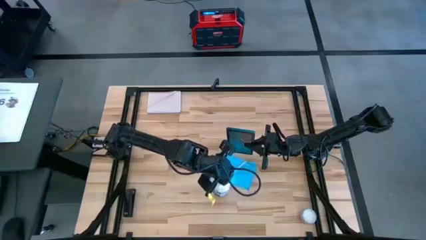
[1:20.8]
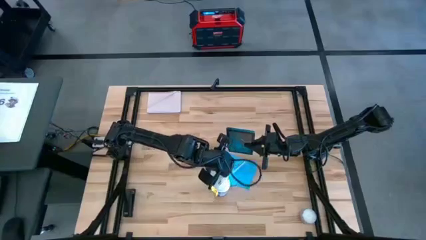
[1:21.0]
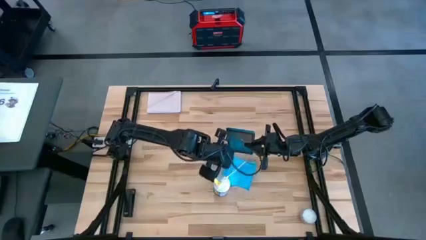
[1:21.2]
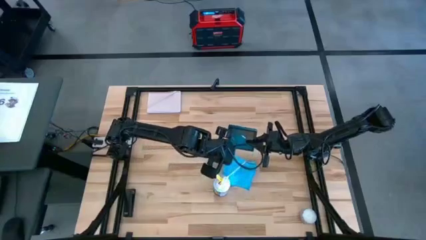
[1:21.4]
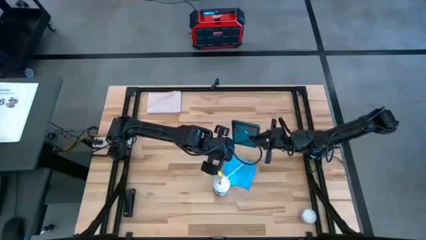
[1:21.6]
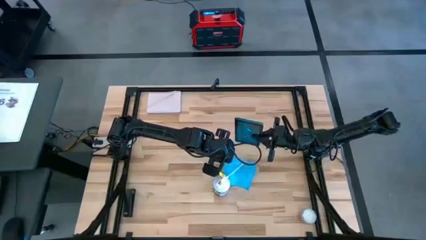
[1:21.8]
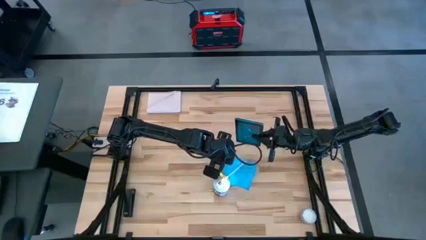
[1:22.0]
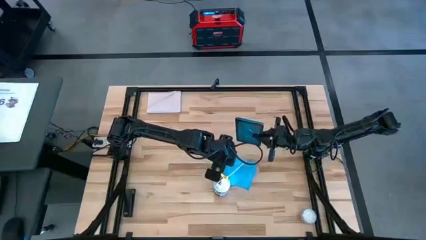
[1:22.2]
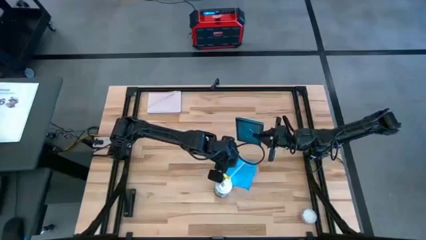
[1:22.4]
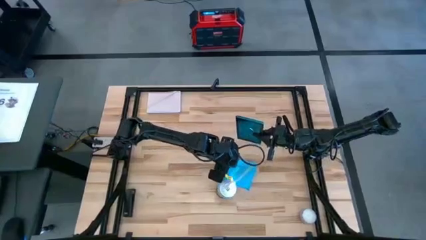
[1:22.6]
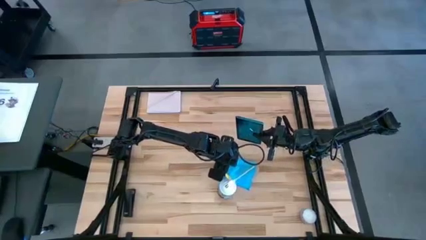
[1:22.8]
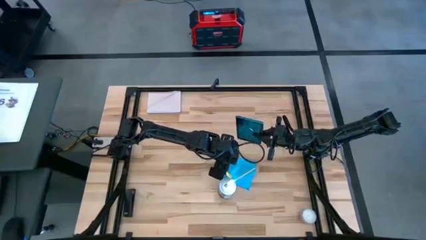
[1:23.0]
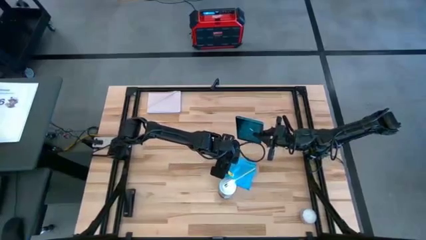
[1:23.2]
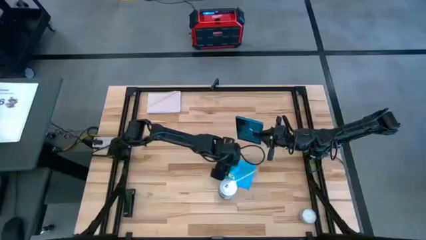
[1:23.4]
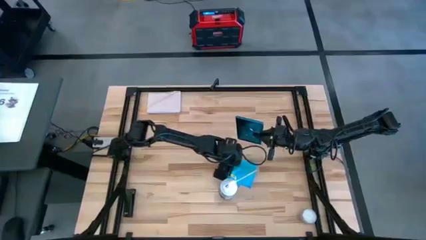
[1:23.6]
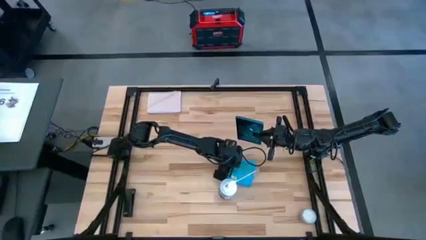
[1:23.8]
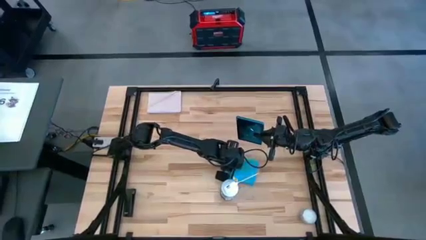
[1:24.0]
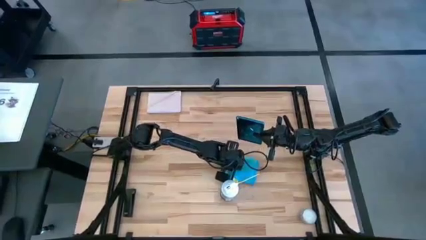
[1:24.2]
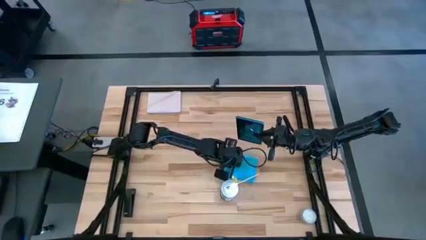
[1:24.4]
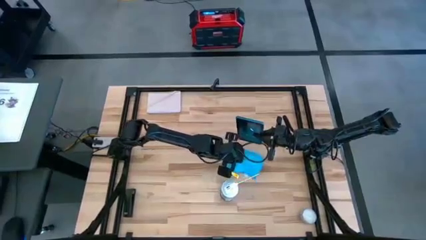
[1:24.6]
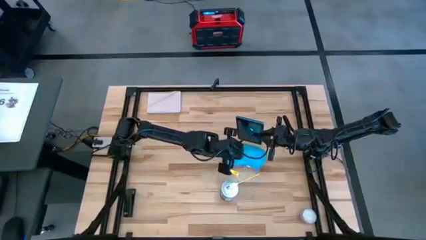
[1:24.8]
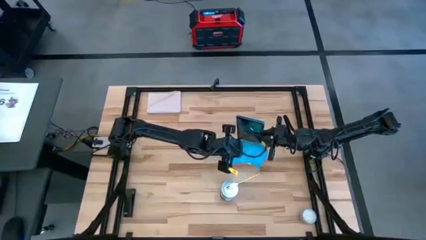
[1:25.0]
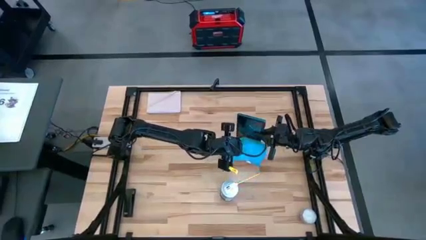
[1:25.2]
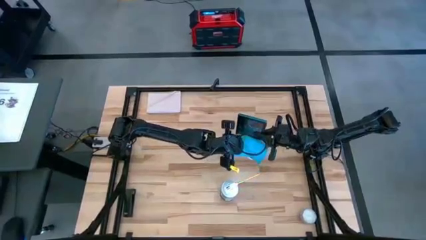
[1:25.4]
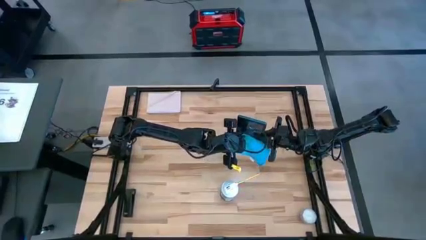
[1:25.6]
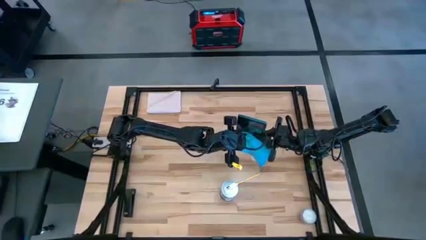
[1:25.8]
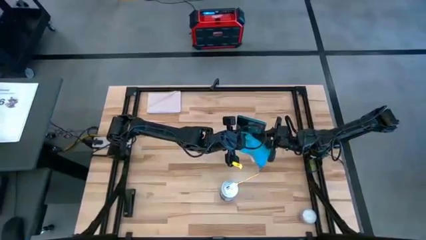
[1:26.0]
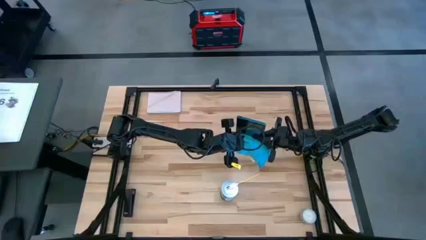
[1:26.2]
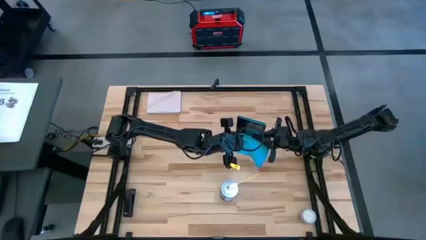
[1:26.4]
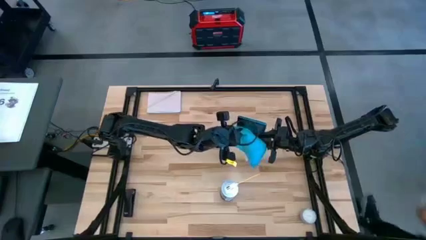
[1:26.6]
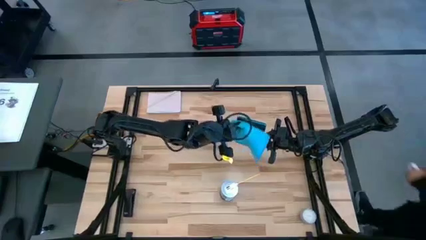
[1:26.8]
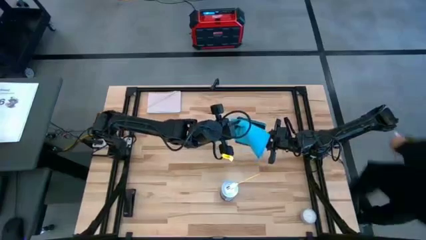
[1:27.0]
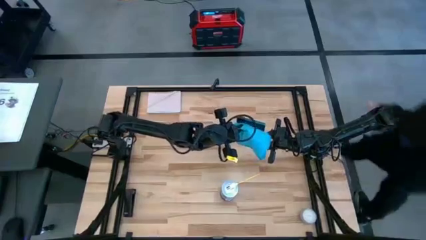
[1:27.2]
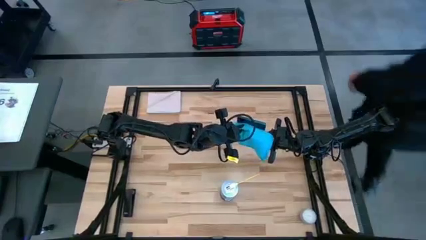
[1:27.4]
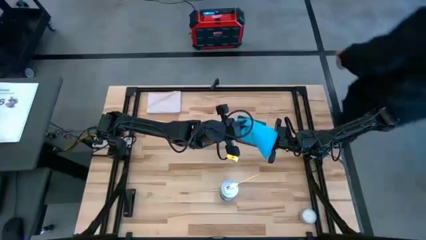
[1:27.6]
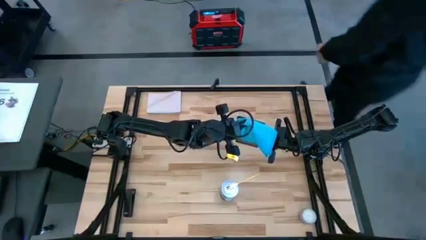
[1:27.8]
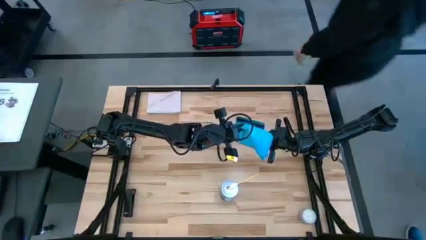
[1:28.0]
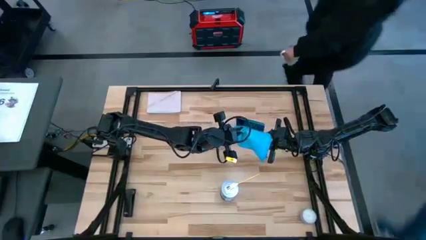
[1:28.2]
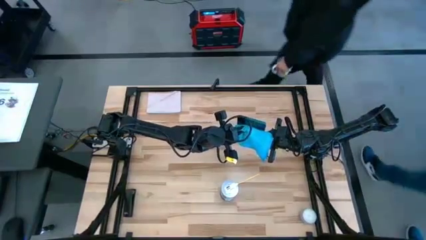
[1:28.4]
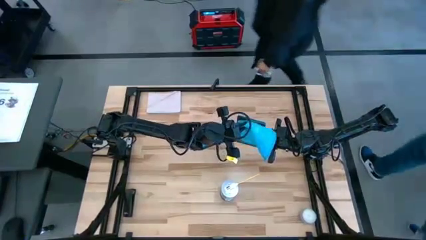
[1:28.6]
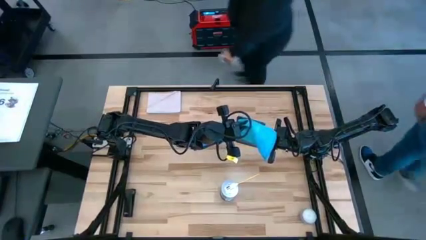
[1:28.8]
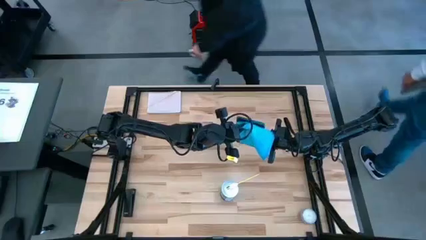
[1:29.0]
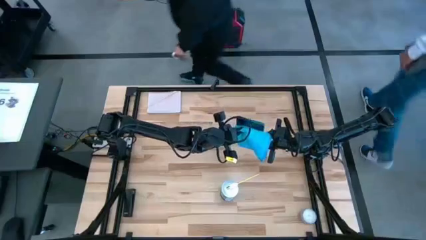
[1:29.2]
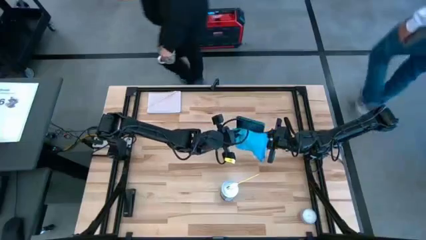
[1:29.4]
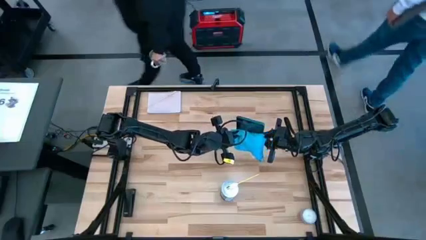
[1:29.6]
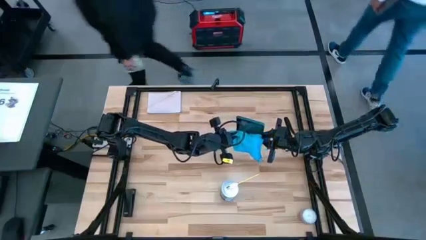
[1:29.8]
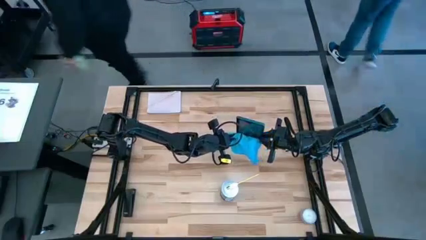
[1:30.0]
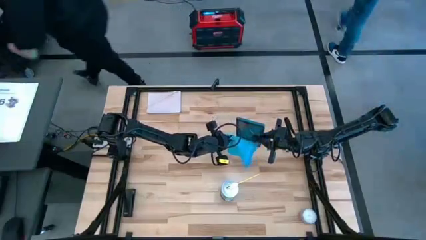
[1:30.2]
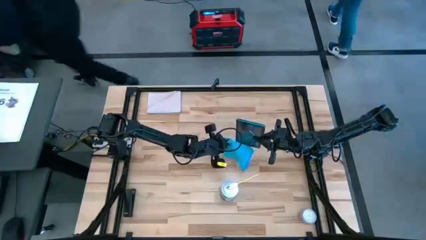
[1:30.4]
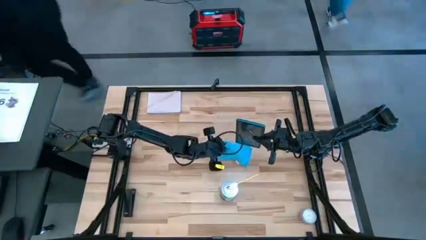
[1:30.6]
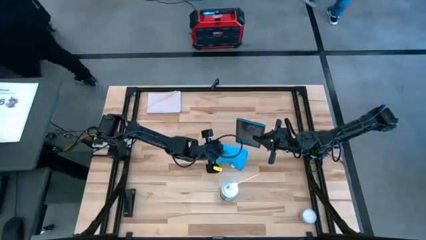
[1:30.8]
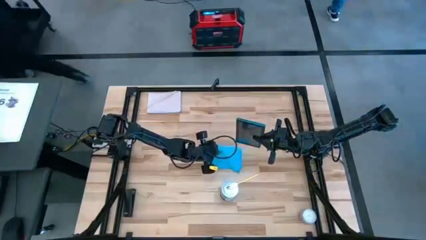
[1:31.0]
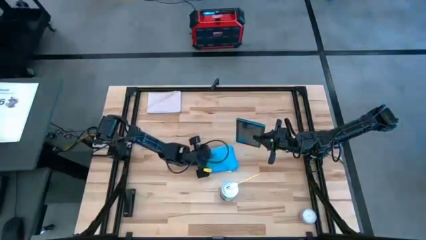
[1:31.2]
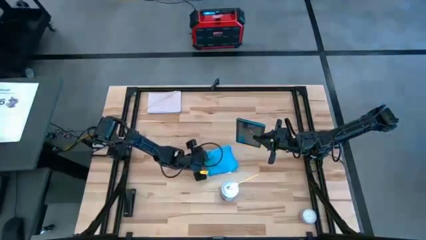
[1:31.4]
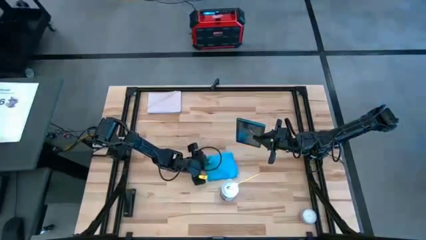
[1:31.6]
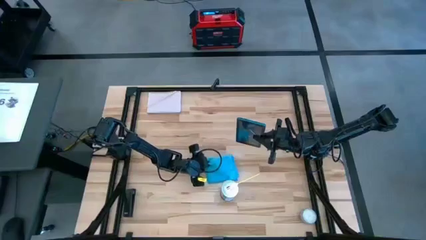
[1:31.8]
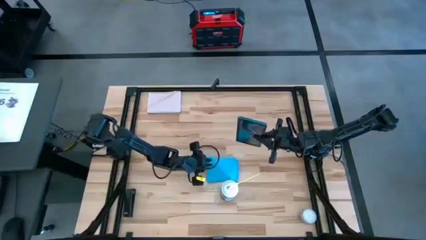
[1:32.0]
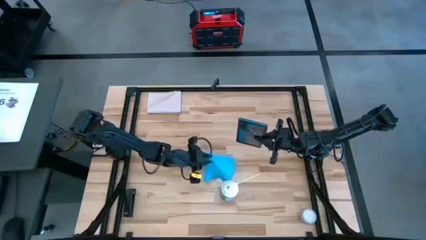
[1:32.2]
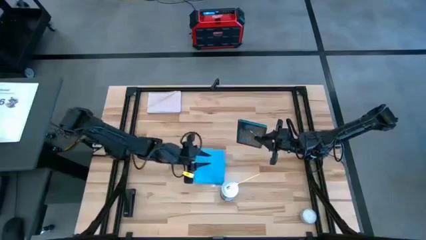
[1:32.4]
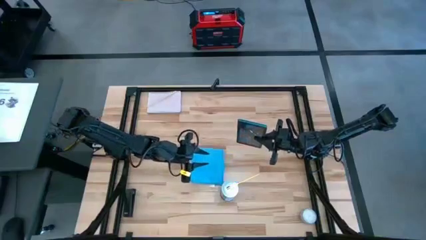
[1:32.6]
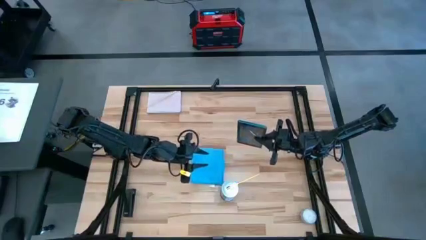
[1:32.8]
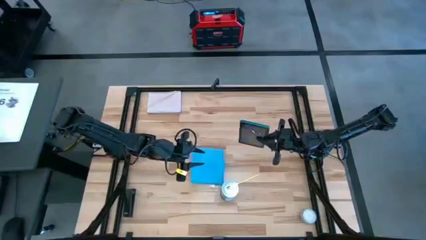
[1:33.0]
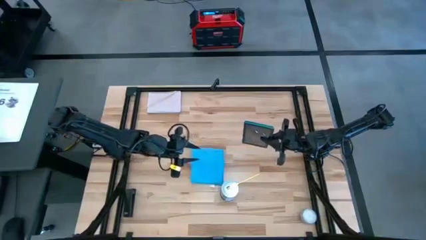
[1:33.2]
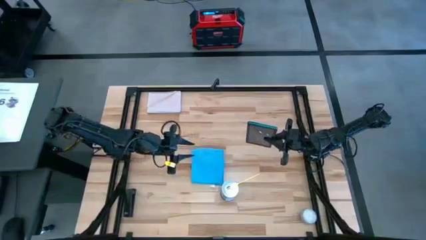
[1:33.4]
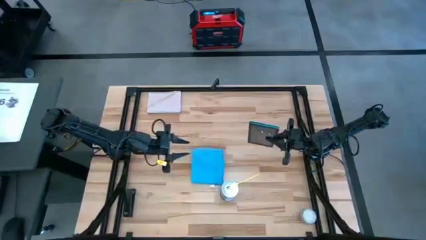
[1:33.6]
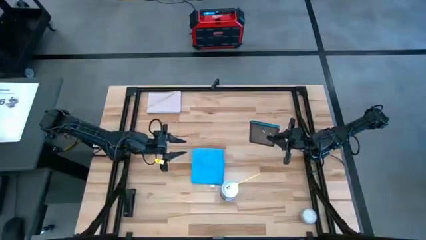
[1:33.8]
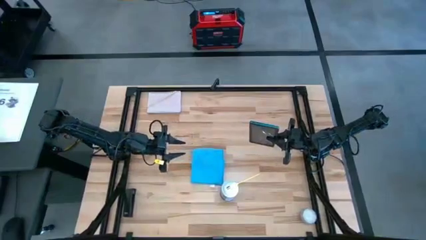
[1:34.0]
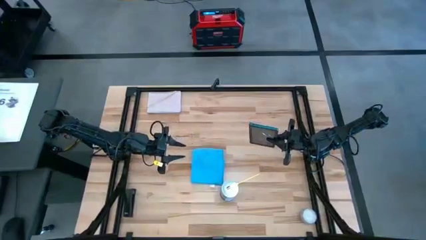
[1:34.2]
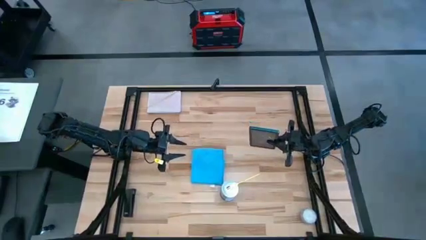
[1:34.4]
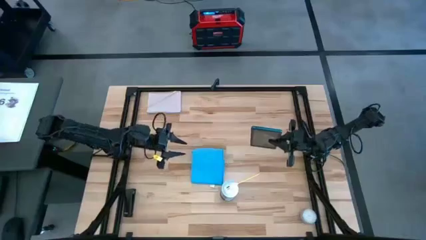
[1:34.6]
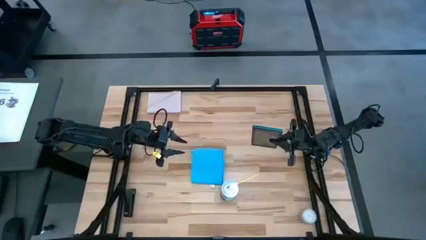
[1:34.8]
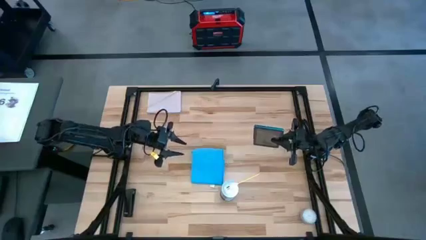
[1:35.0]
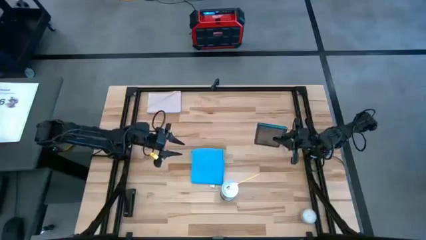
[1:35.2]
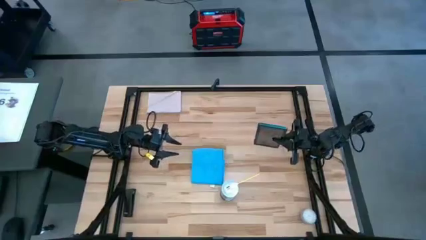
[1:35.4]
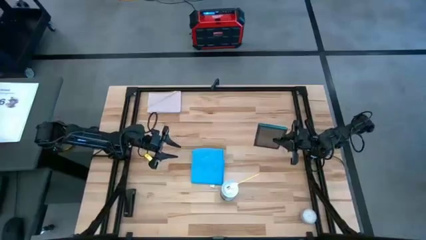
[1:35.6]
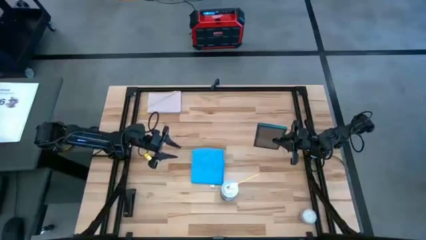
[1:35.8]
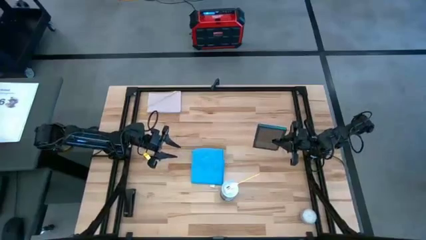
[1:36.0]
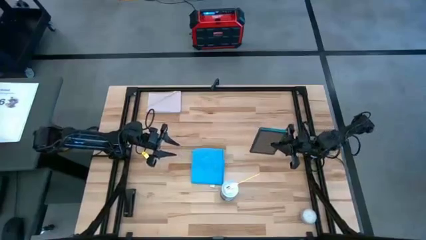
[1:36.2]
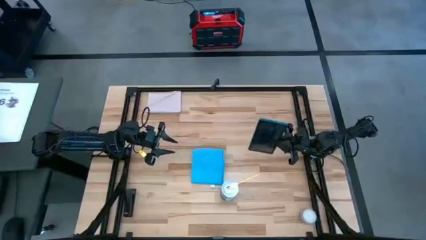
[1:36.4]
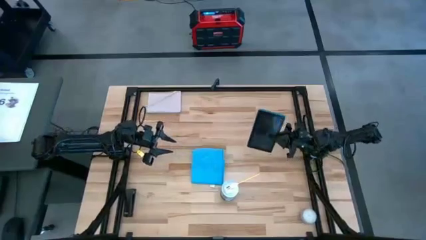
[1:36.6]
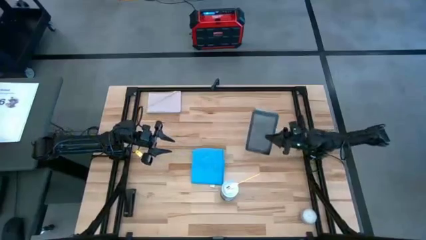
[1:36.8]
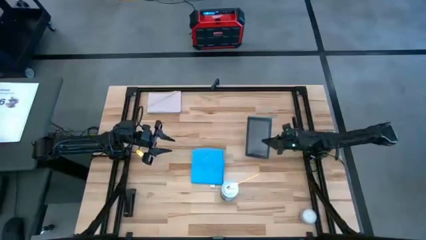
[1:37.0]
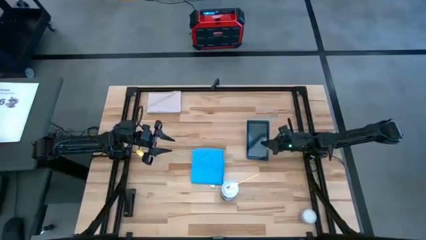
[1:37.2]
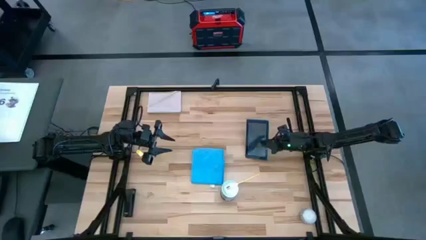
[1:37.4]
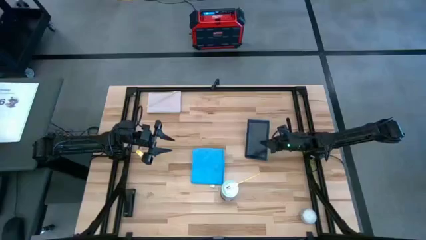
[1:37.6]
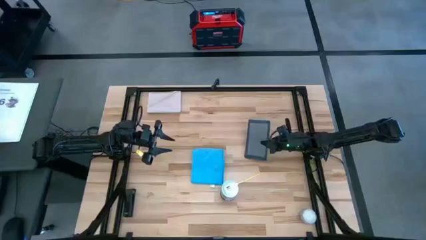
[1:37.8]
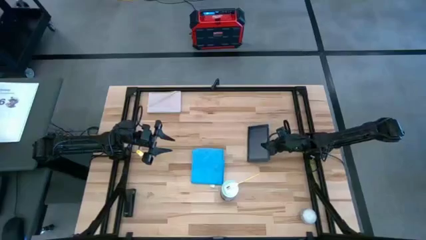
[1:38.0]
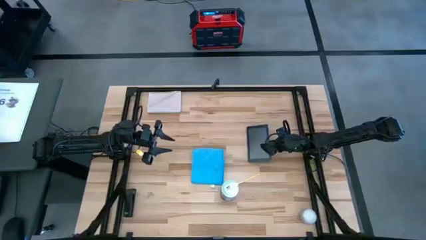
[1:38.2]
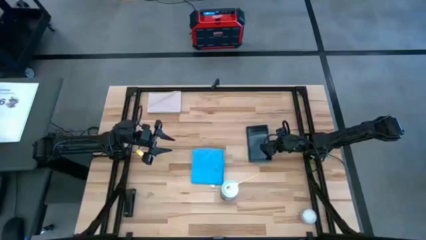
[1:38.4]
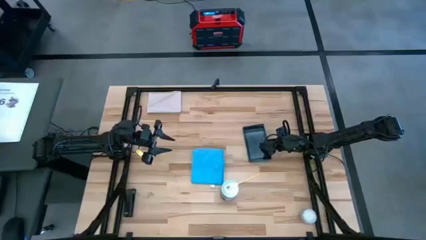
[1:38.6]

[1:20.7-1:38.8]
Task: Apply microfiber cloth
Wipe the front of the green tablet using the blue microfiber cloth
